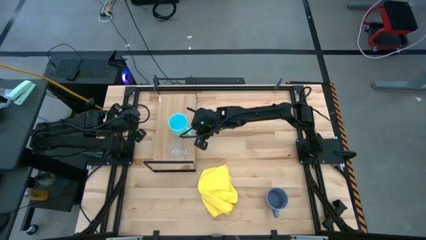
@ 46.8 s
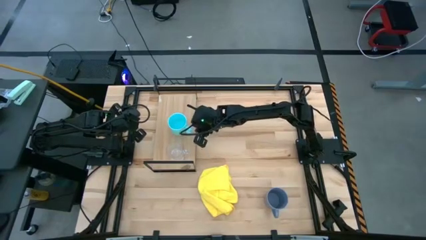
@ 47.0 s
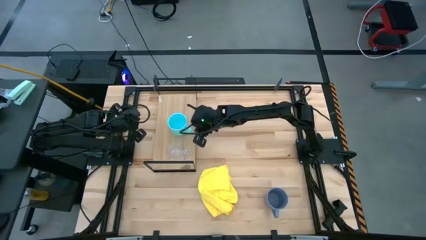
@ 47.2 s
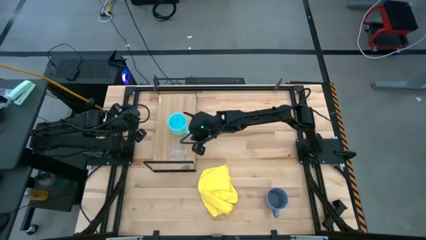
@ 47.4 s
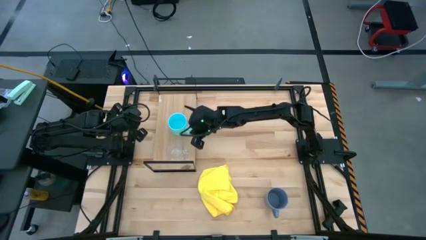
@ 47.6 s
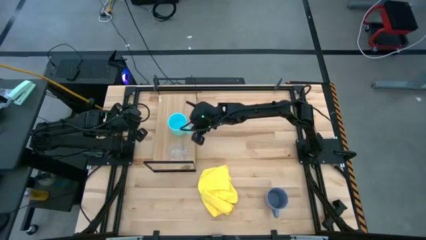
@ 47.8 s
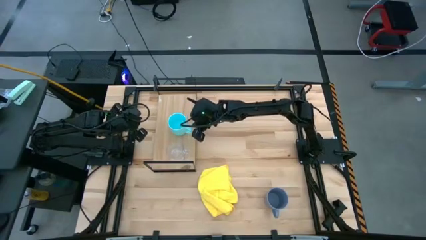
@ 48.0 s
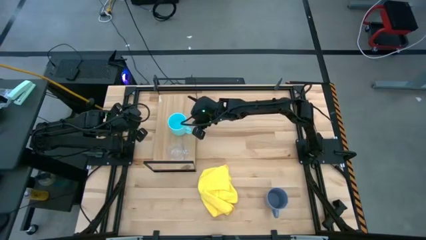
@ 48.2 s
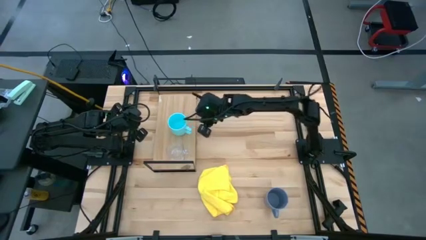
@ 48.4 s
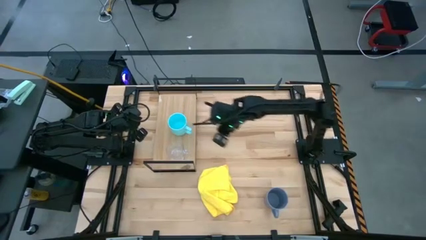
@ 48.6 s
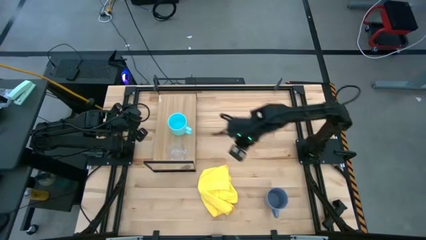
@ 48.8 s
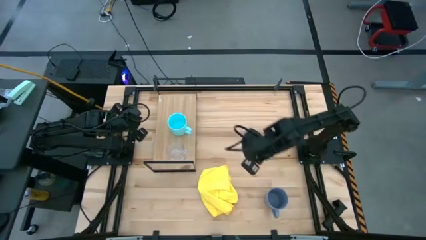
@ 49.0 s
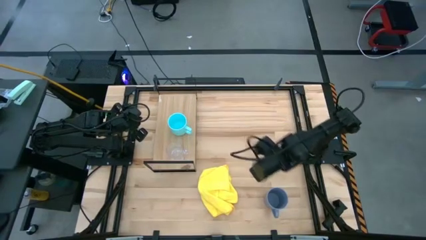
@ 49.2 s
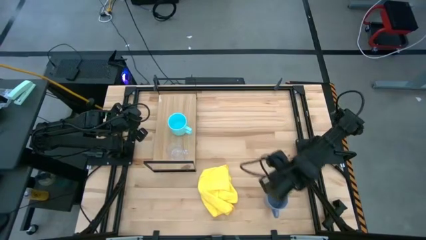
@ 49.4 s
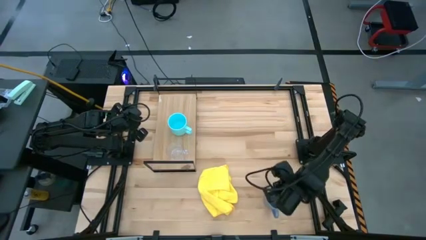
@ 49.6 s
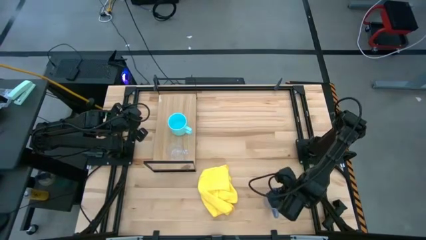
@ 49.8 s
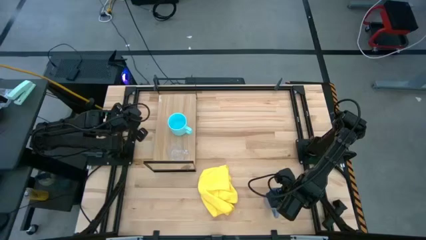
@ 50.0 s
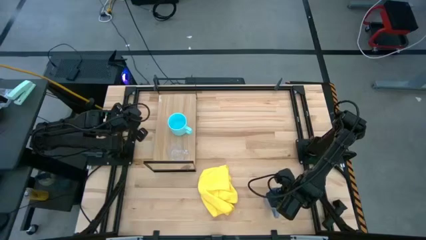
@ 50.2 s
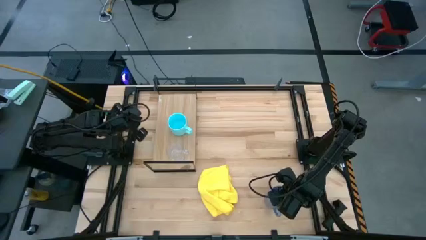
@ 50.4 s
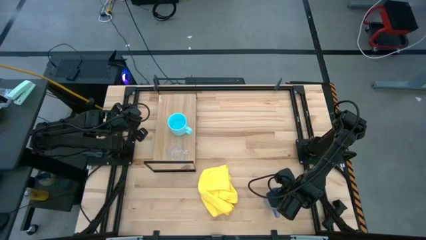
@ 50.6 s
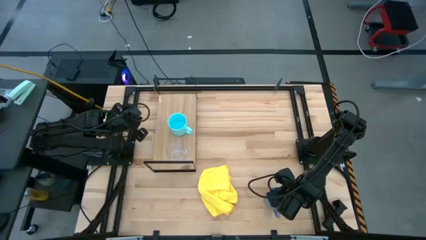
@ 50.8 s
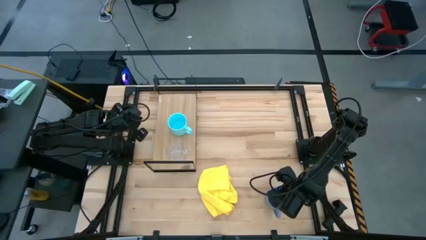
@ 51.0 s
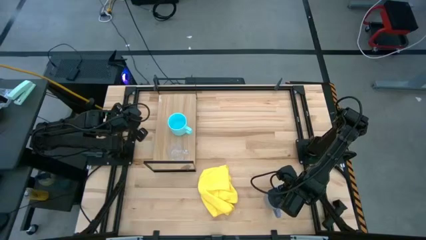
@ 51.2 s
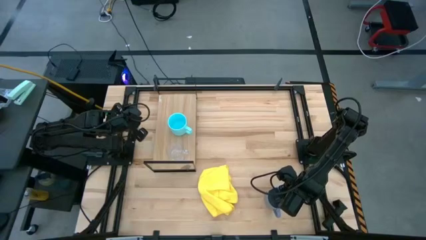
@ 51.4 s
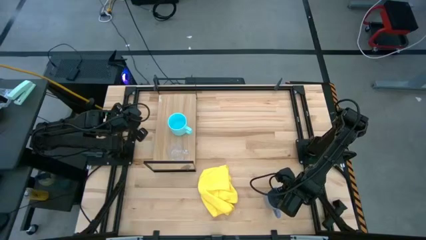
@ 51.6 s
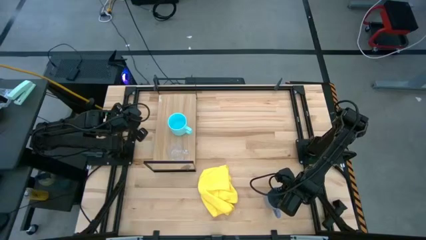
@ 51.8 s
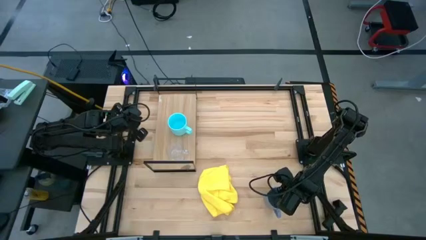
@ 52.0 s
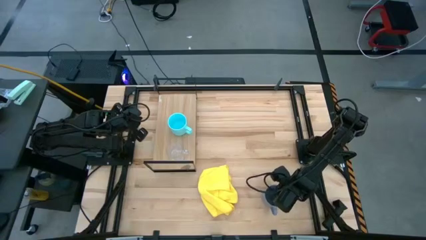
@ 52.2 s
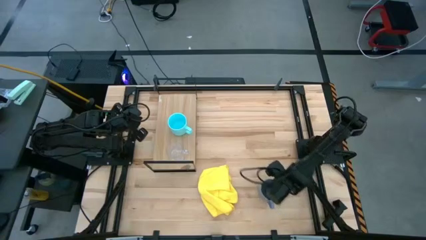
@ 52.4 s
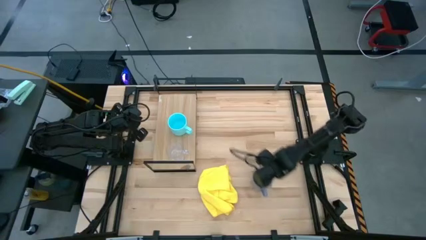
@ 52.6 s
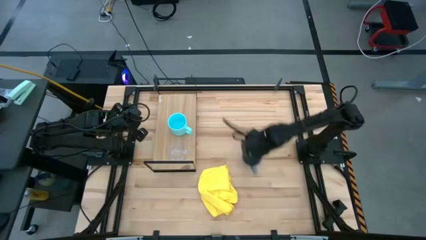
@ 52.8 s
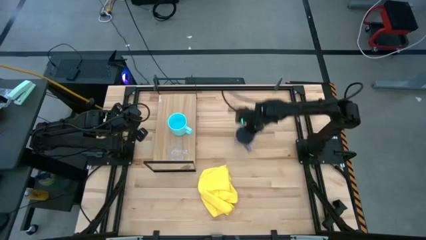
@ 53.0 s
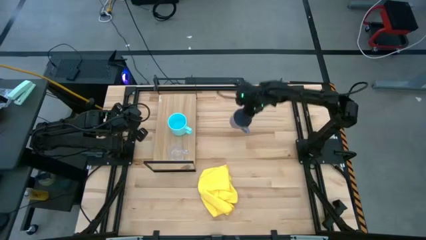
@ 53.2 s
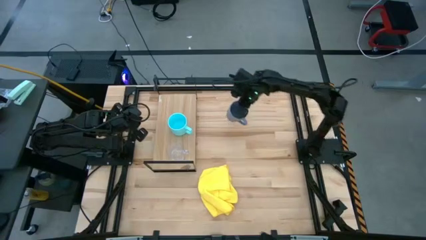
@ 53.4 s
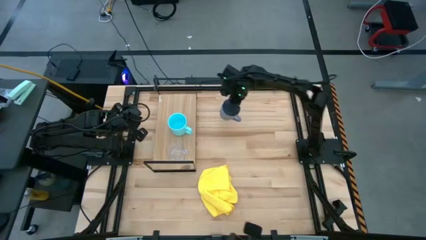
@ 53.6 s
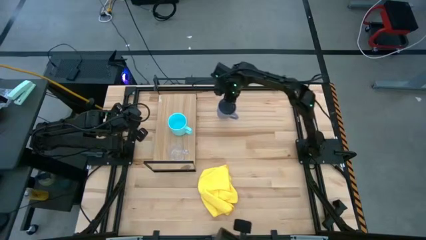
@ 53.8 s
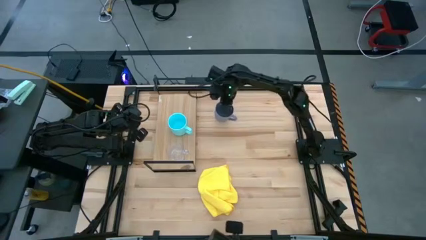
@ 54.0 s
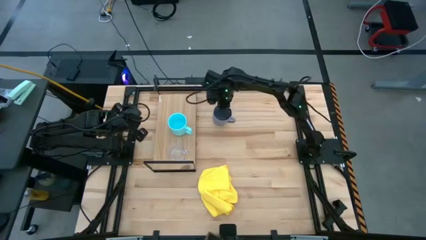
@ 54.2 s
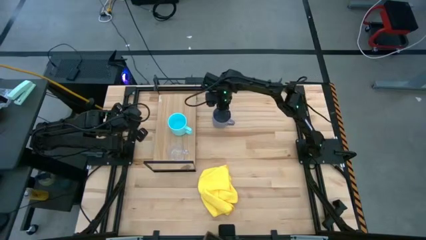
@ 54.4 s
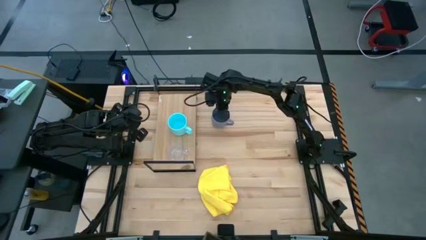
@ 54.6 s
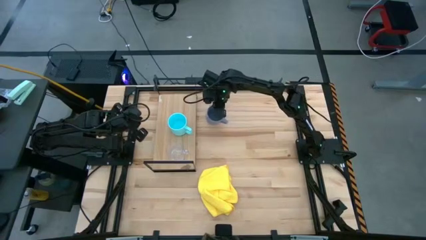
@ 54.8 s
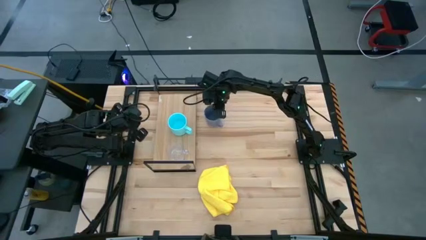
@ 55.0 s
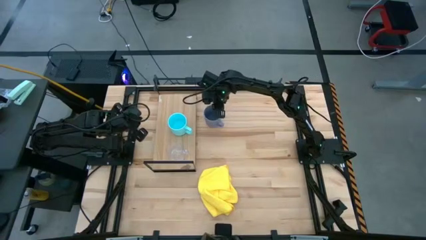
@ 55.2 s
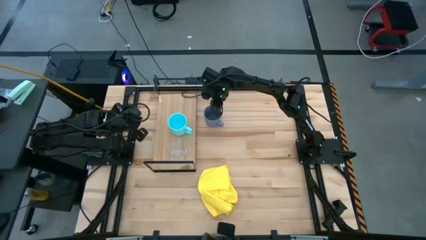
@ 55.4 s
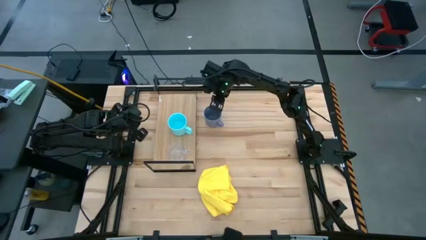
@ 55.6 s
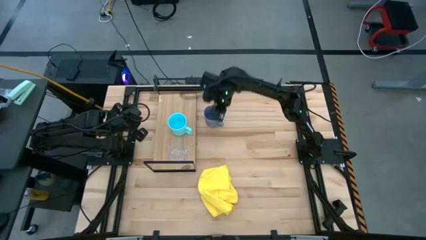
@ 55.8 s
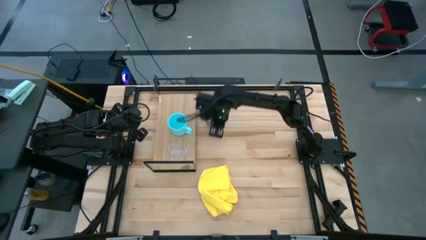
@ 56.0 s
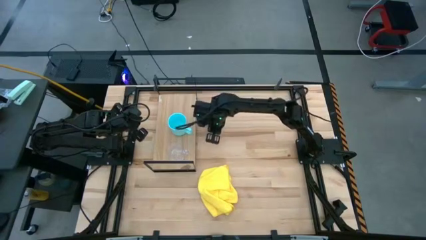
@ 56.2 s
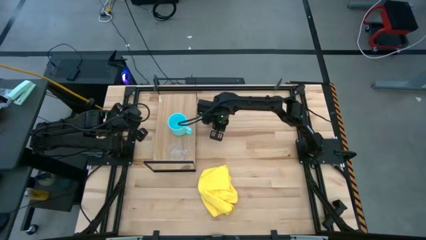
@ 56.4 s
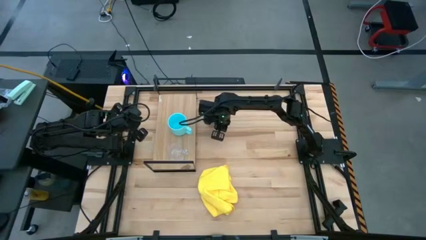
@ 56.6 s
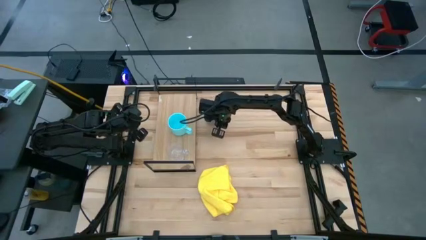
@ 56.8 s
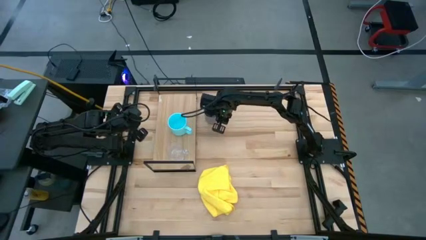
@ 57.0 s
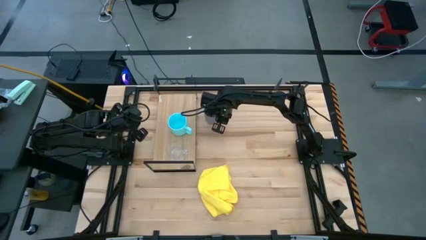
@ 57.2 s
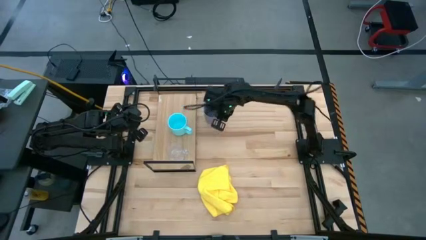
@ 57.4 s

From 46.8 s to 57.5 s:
Task: Stack small to large cups/mugs on shelf
Put the dark blue on the shelf
